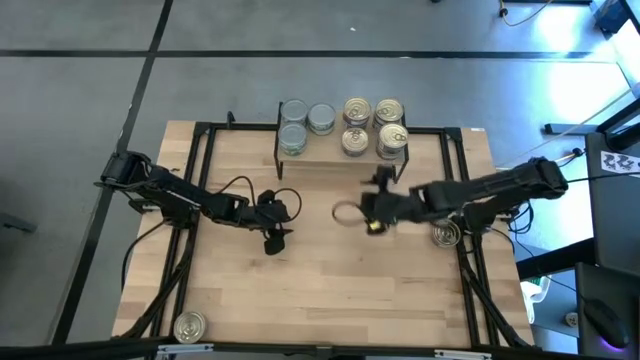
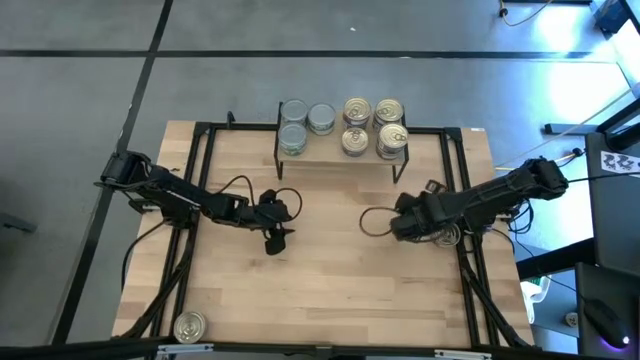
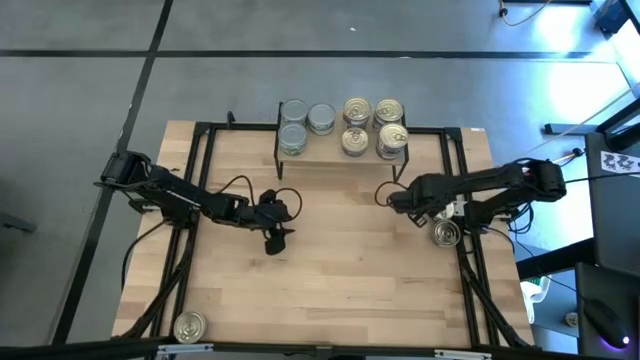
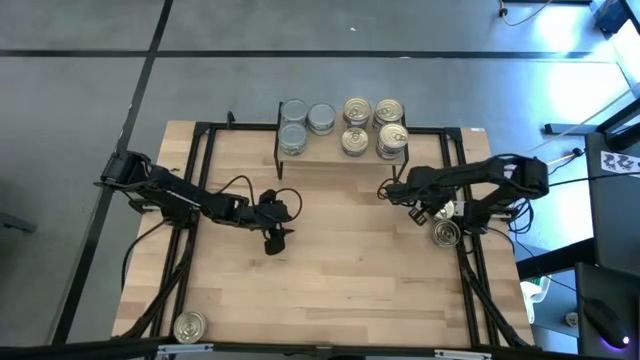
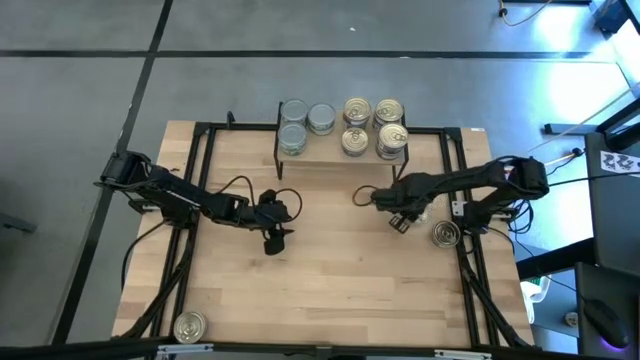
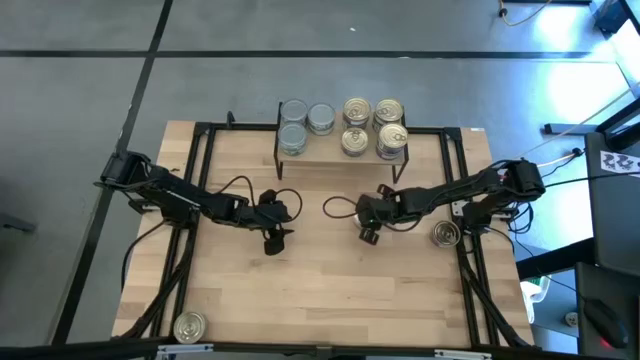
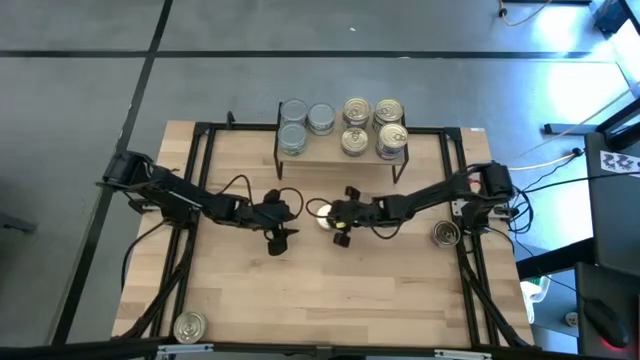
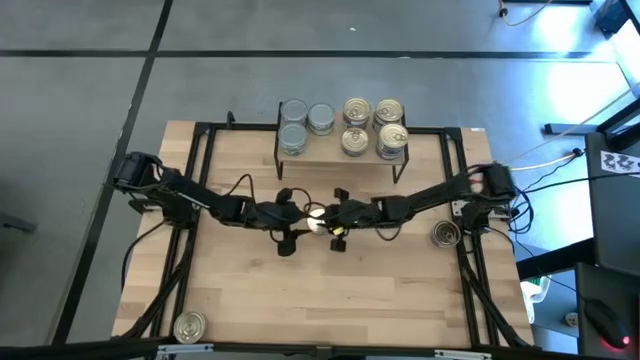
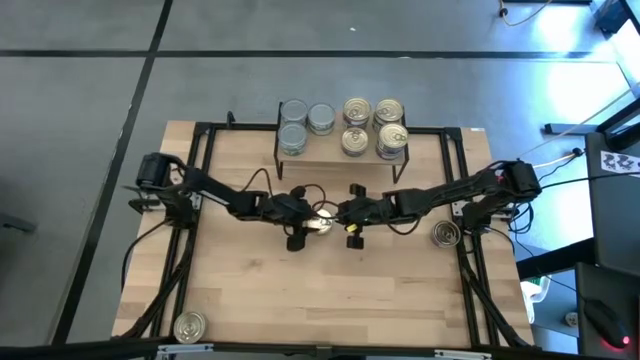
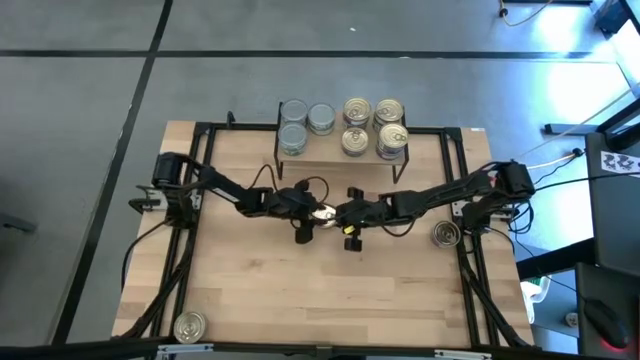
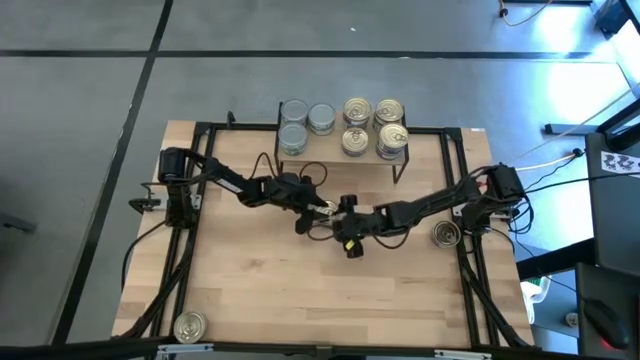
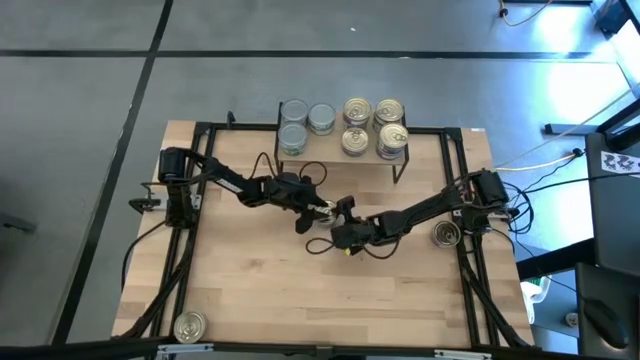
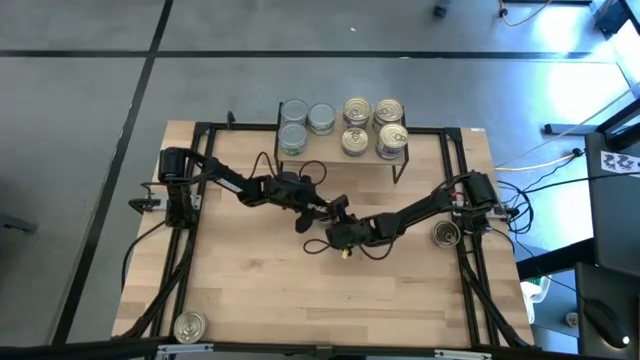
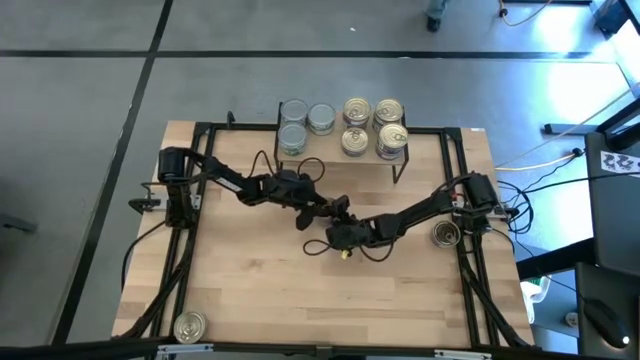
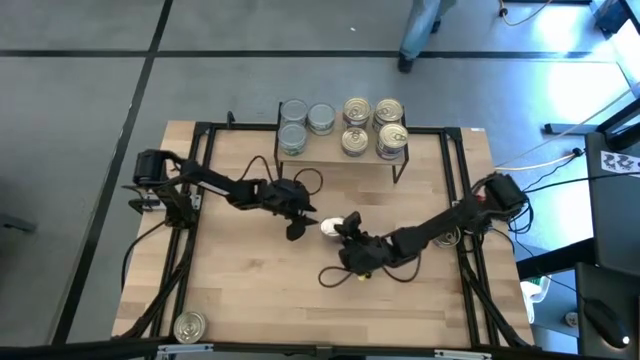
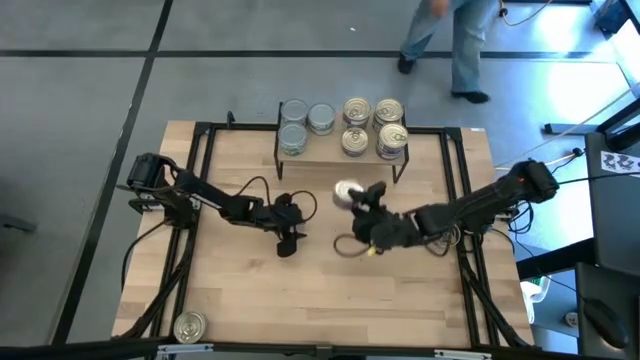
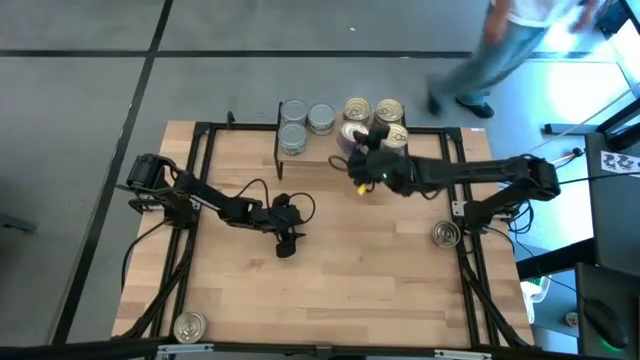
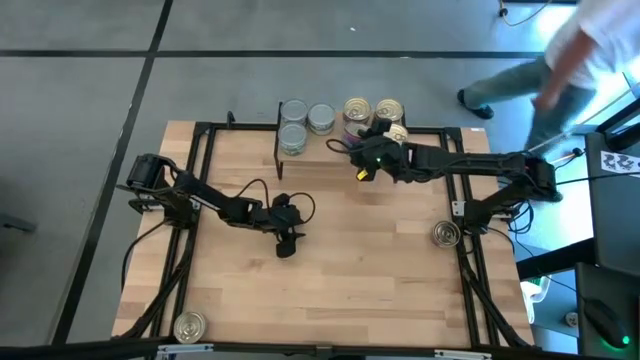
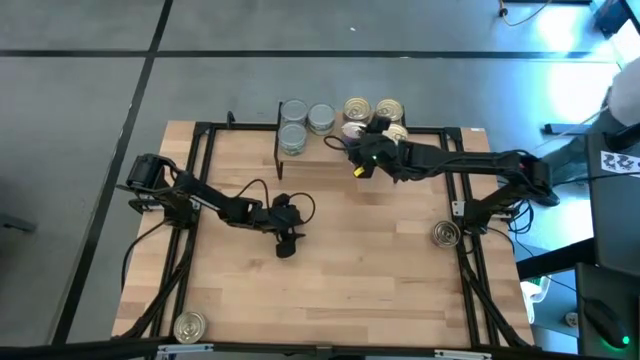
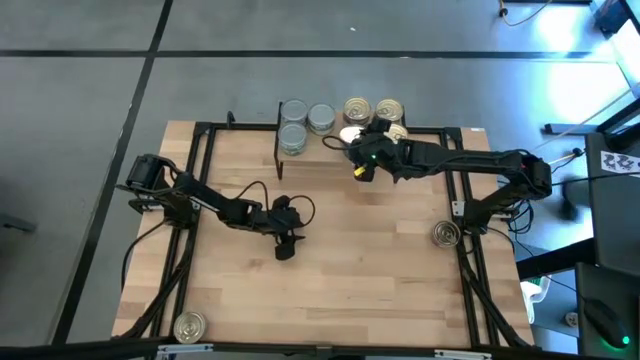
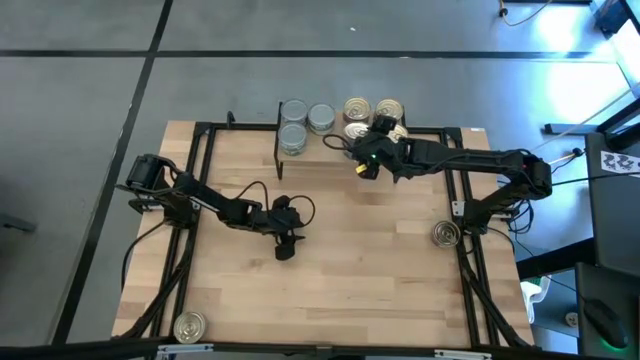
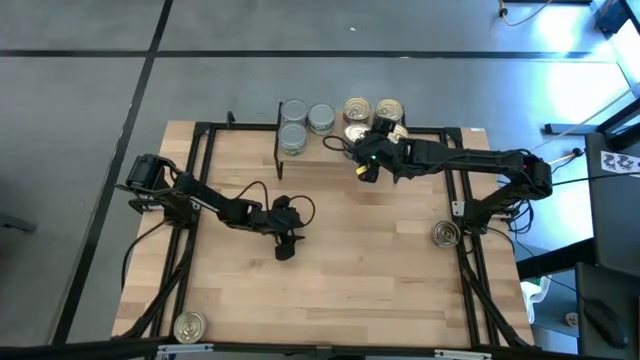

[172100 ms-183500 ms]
Task: Stack canned seafood by type on shelf
Stack the blue pink tuna can on top of the other blue pink tuna can on the shelf

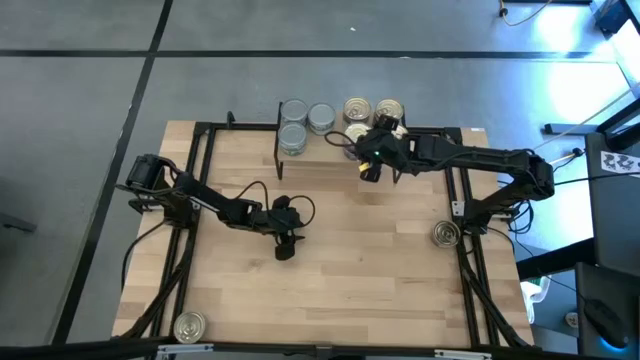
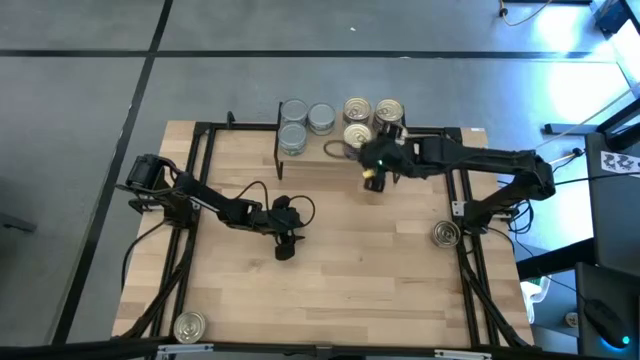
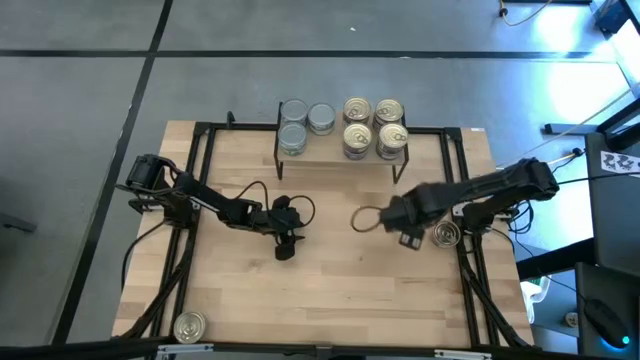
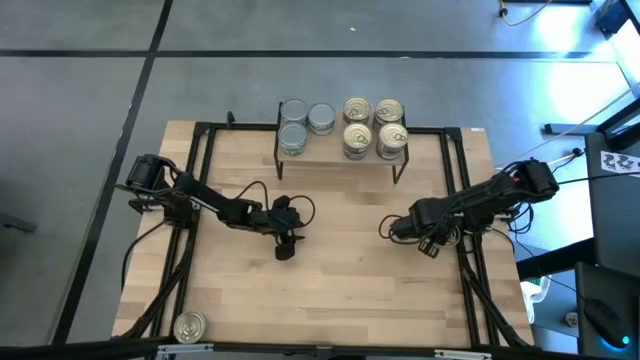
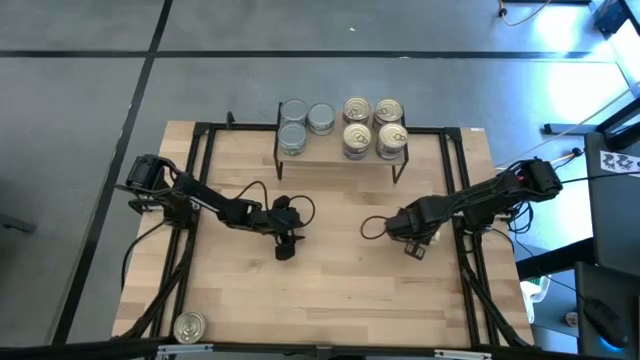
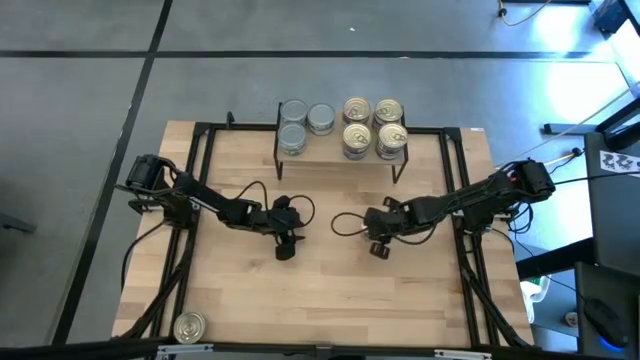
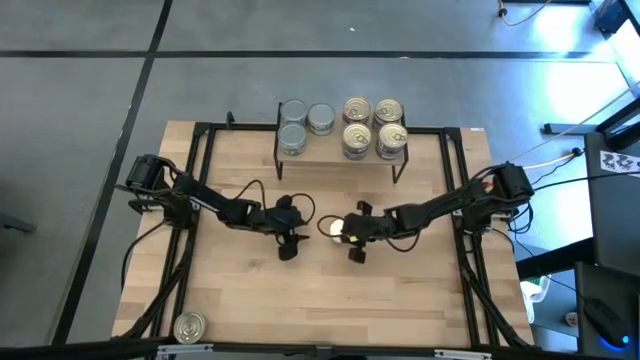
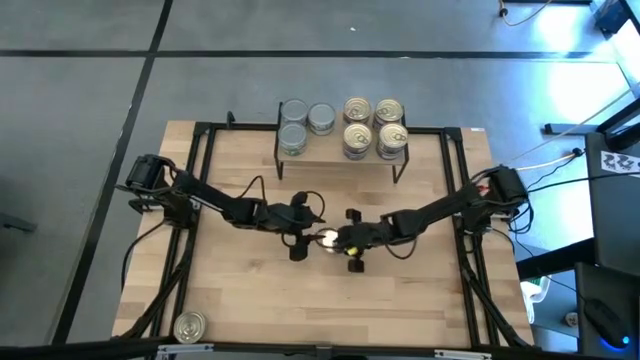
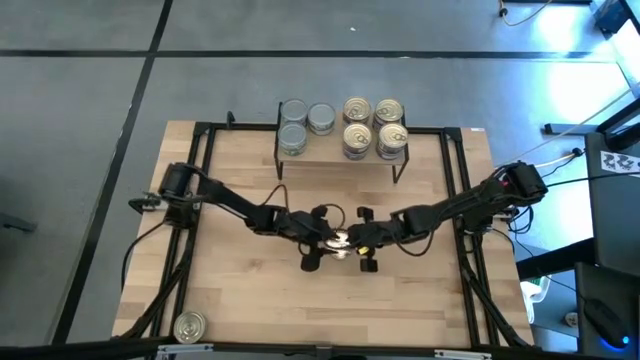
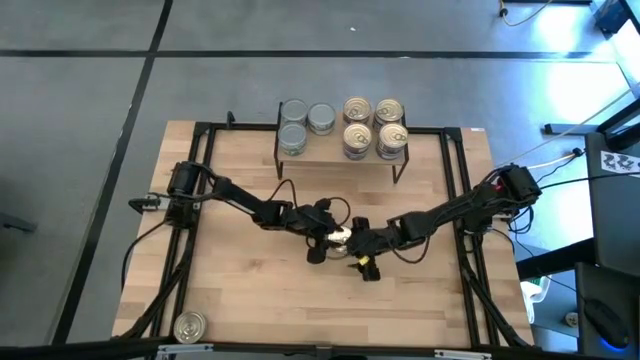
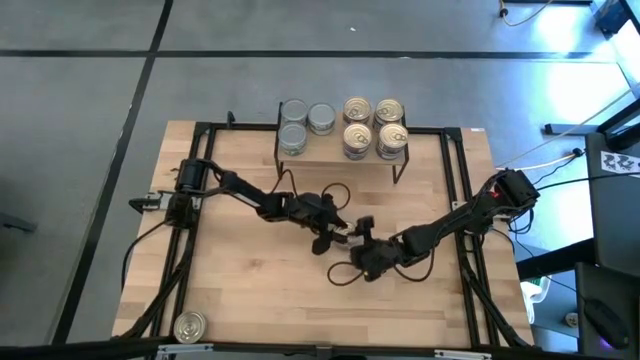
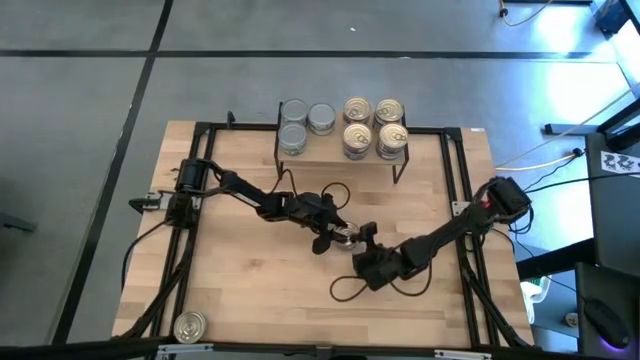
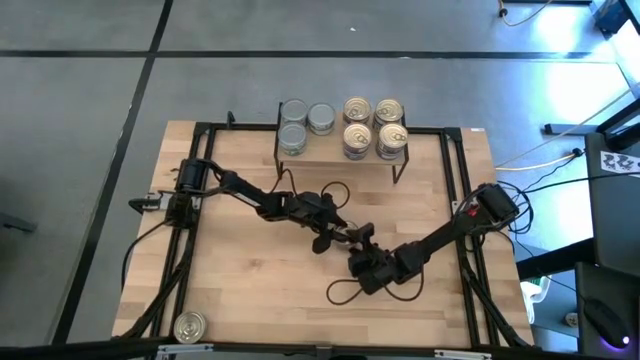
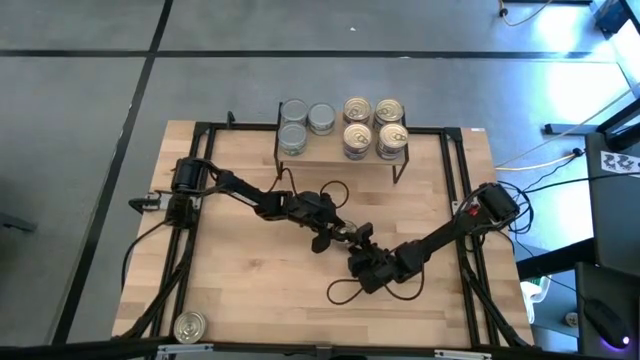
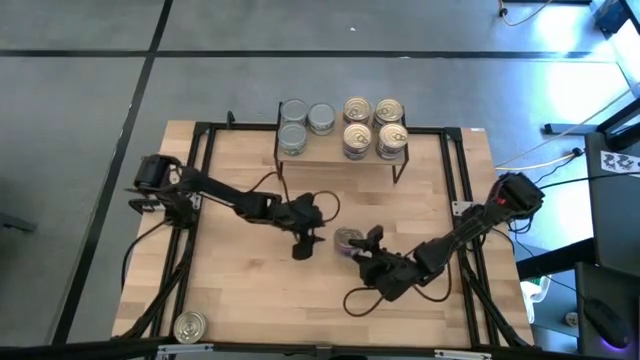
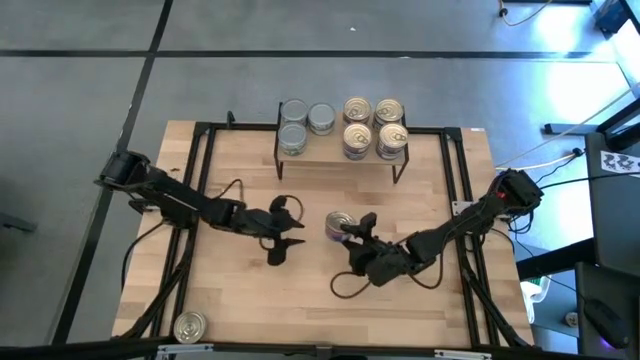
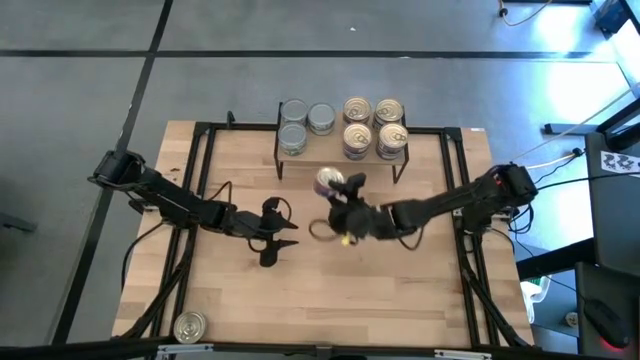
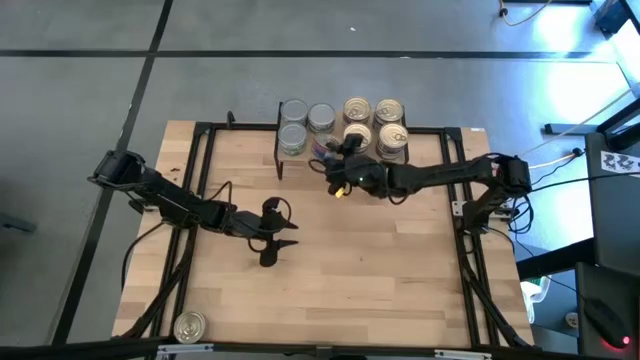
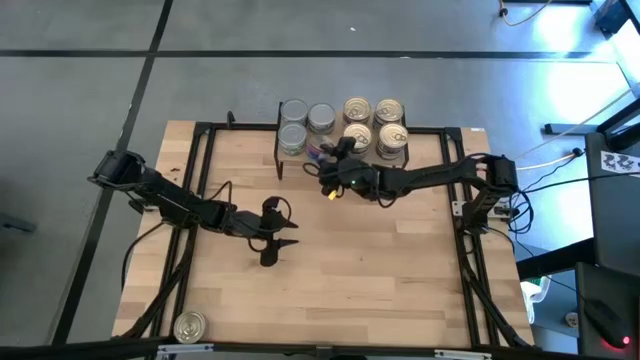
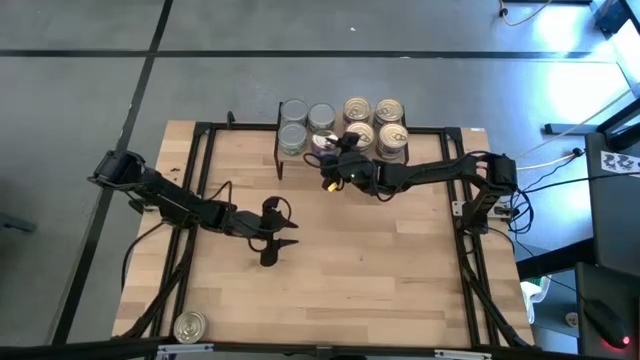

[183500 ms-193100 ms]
Put the blue pink tuna can on the shelf
